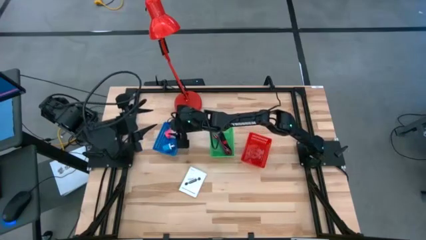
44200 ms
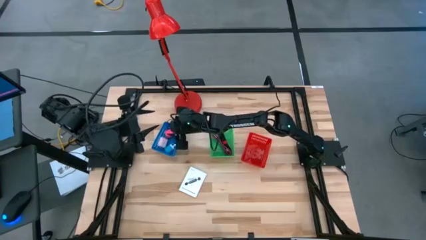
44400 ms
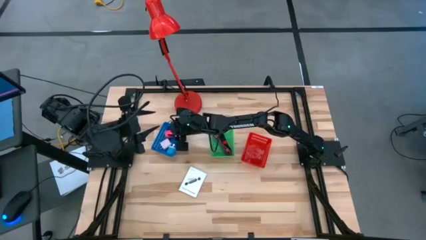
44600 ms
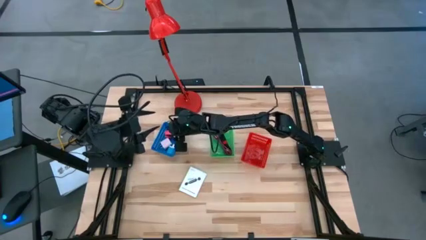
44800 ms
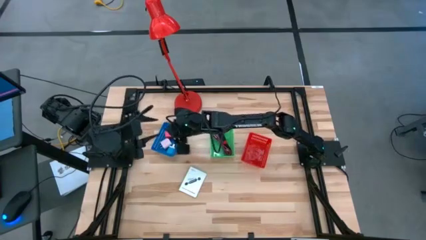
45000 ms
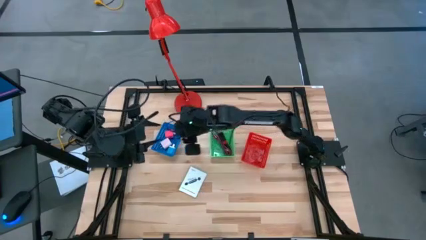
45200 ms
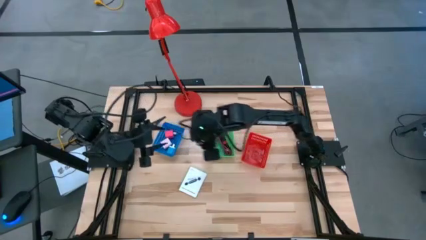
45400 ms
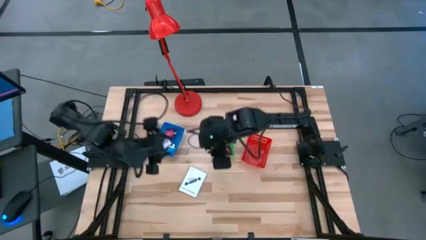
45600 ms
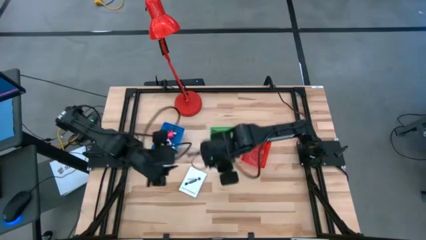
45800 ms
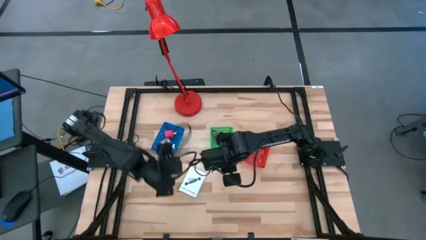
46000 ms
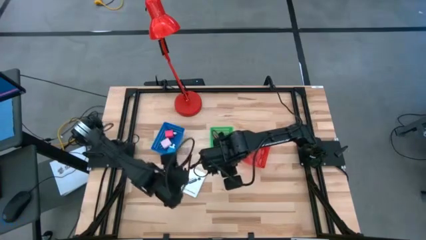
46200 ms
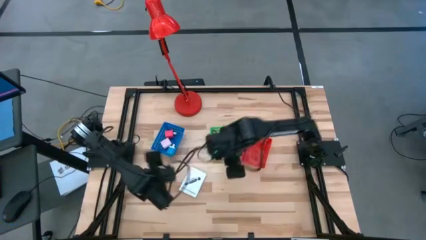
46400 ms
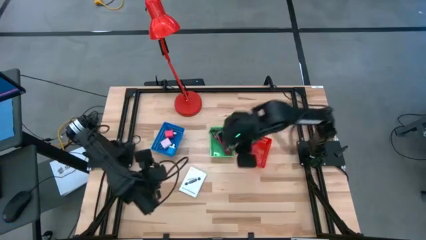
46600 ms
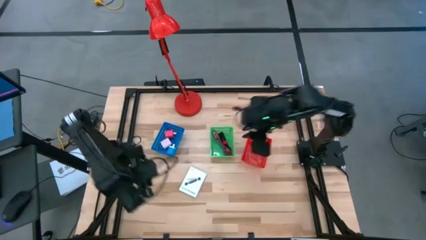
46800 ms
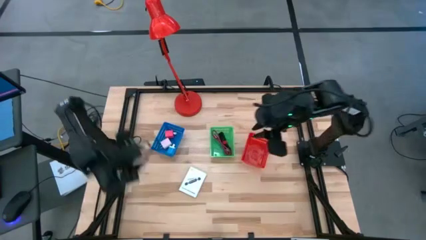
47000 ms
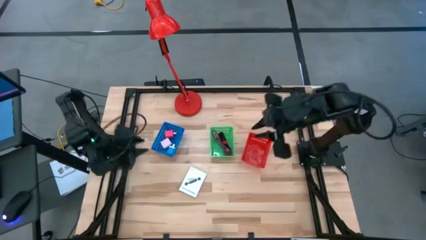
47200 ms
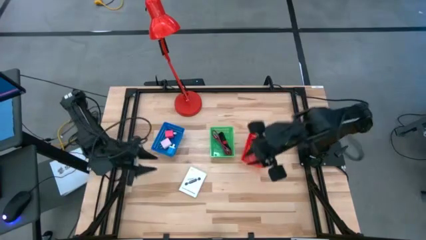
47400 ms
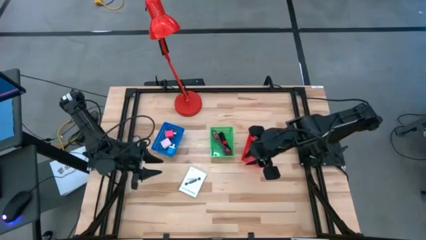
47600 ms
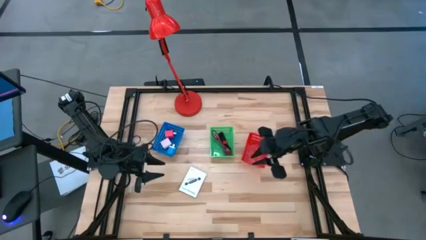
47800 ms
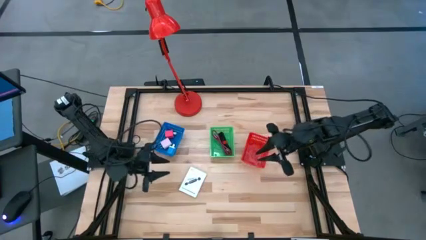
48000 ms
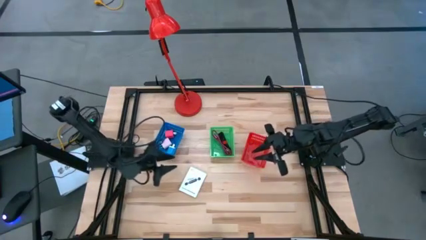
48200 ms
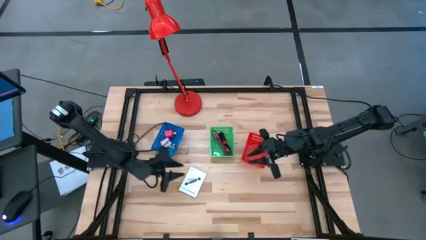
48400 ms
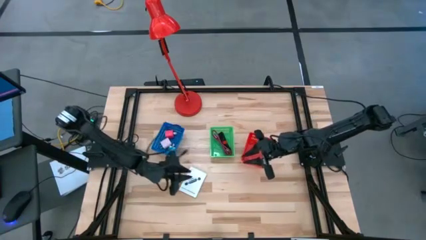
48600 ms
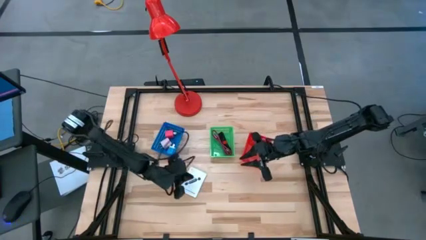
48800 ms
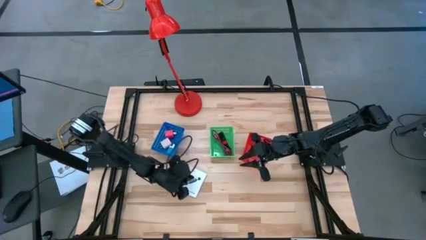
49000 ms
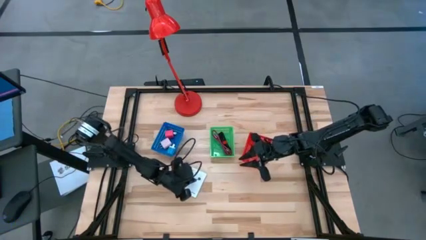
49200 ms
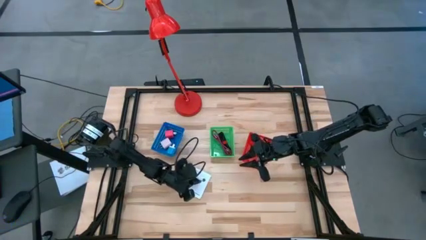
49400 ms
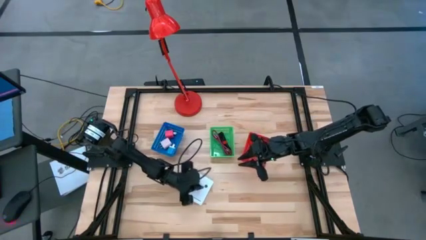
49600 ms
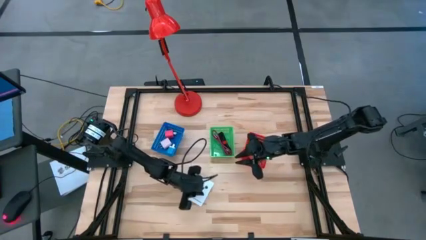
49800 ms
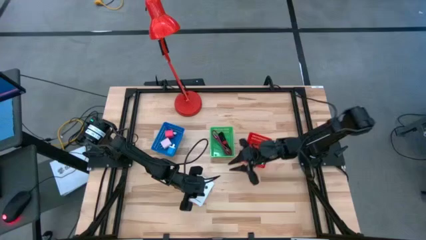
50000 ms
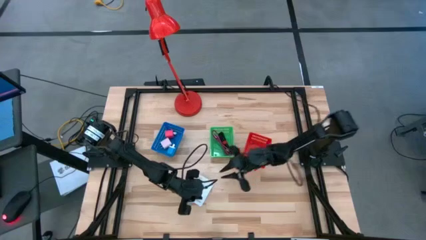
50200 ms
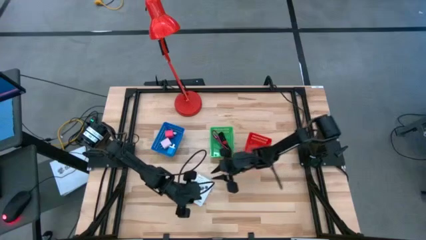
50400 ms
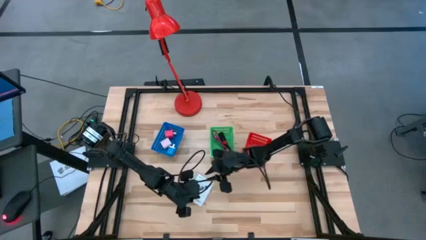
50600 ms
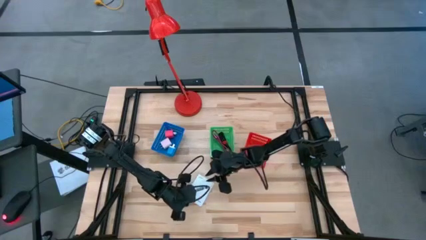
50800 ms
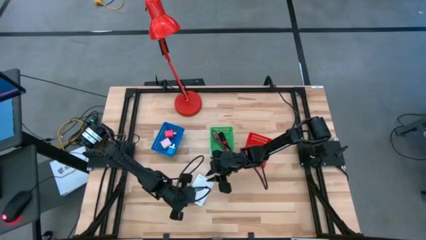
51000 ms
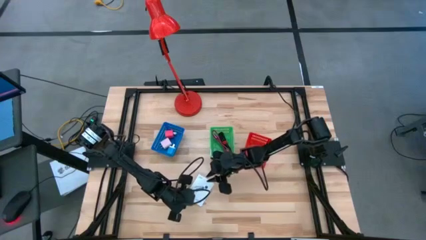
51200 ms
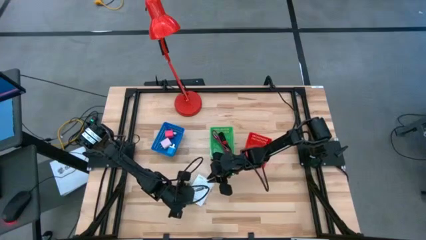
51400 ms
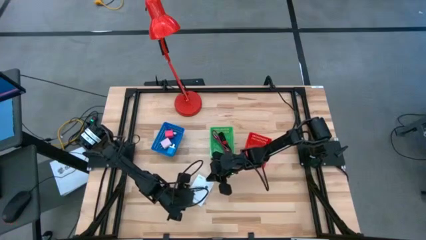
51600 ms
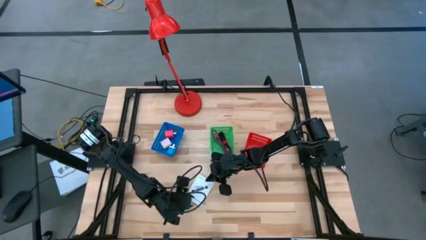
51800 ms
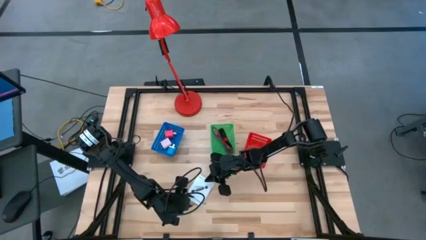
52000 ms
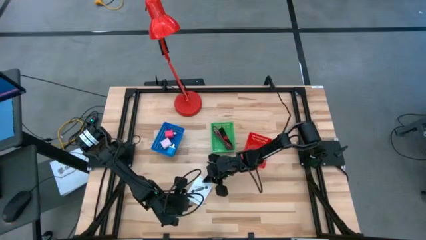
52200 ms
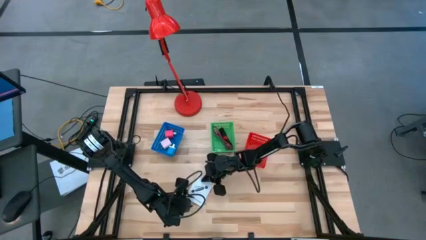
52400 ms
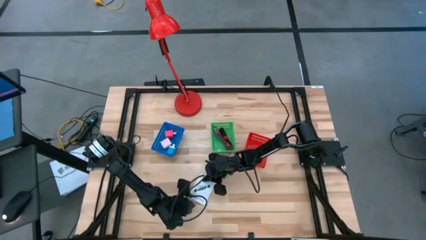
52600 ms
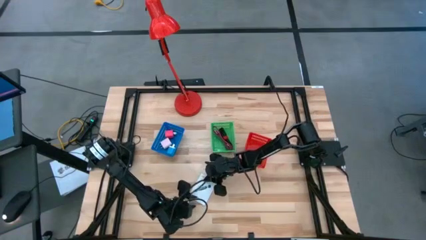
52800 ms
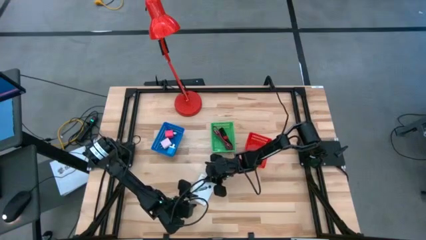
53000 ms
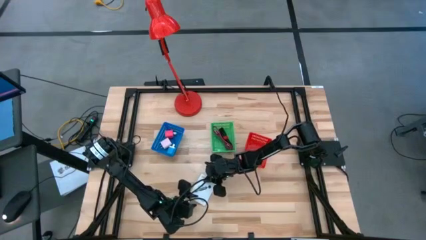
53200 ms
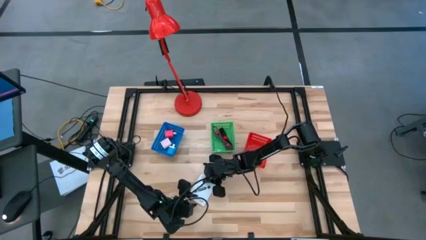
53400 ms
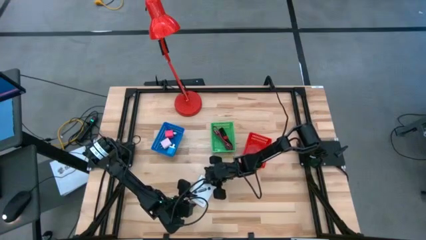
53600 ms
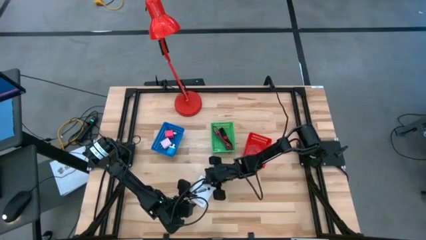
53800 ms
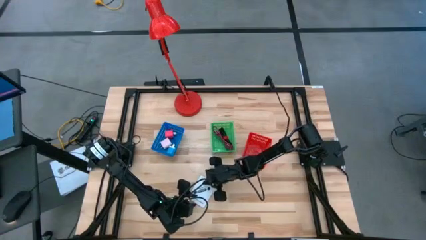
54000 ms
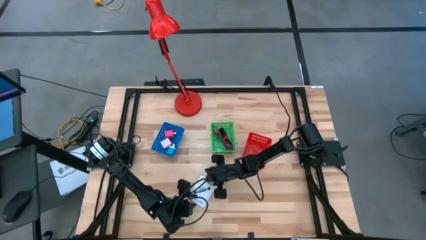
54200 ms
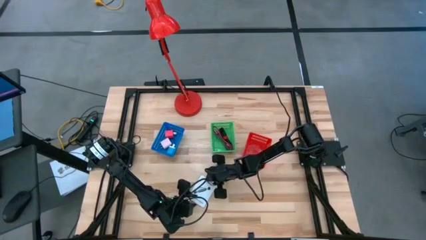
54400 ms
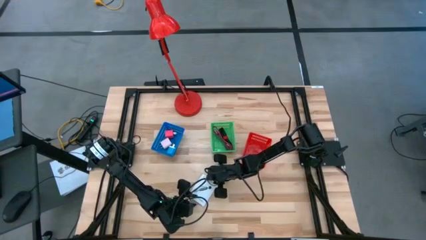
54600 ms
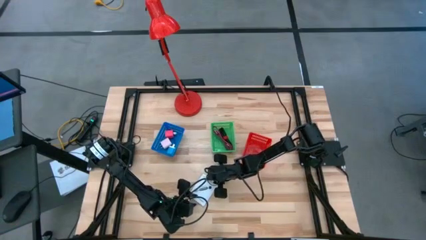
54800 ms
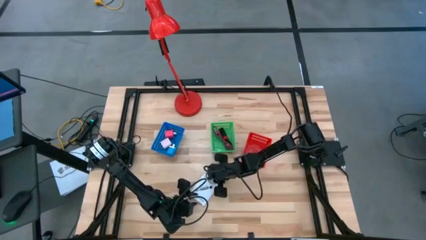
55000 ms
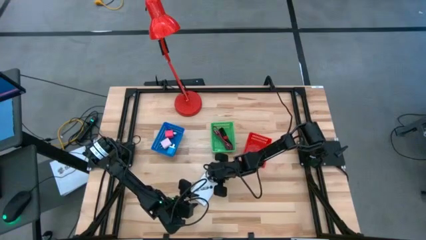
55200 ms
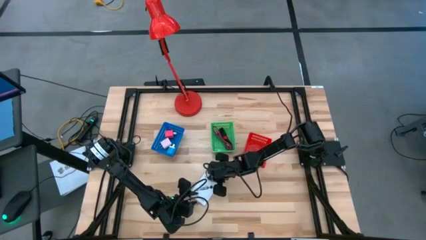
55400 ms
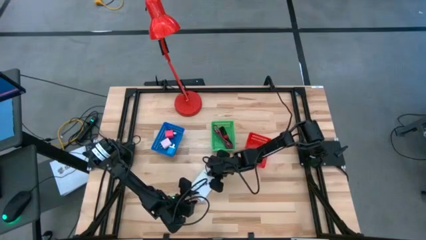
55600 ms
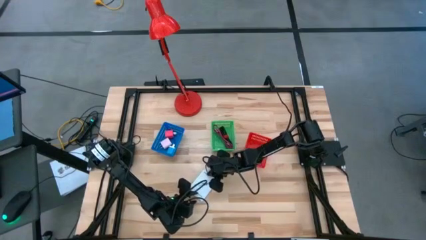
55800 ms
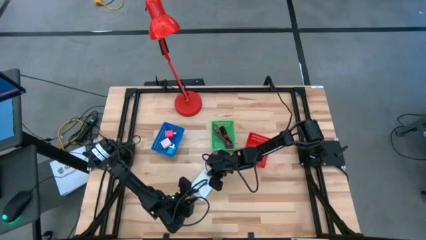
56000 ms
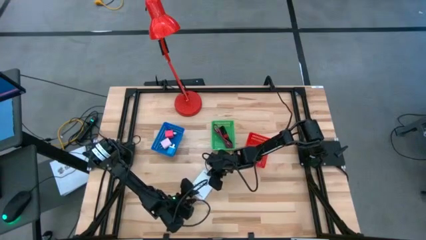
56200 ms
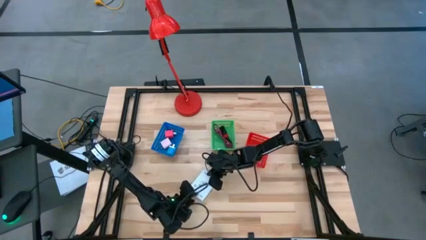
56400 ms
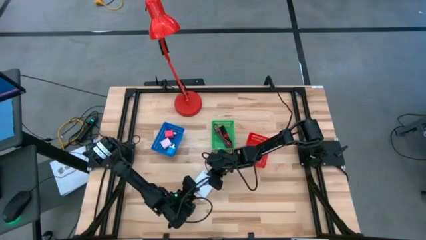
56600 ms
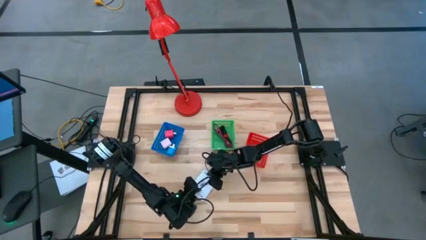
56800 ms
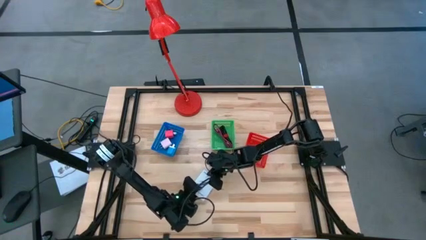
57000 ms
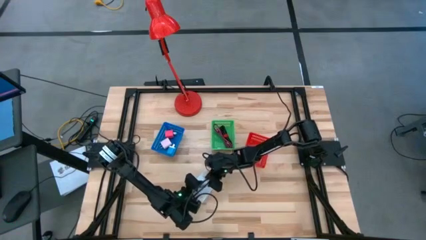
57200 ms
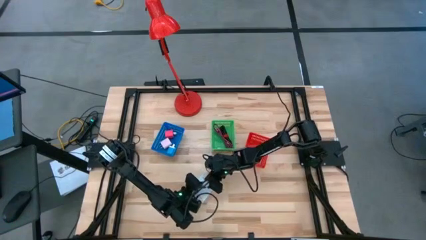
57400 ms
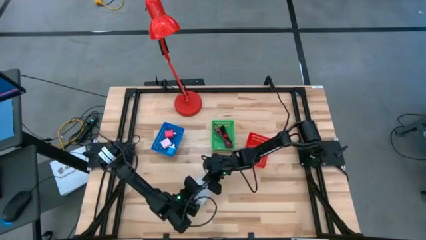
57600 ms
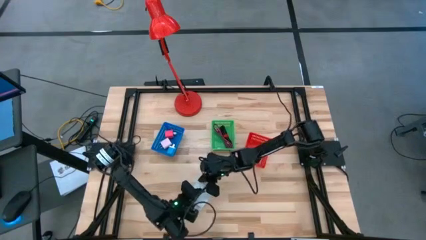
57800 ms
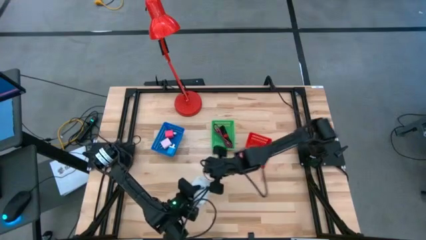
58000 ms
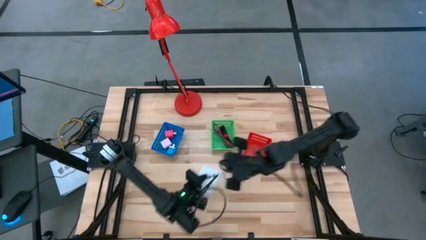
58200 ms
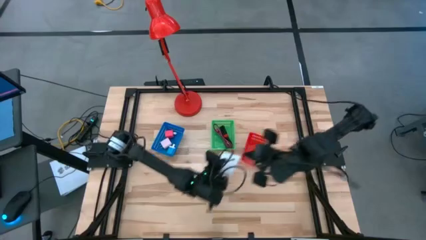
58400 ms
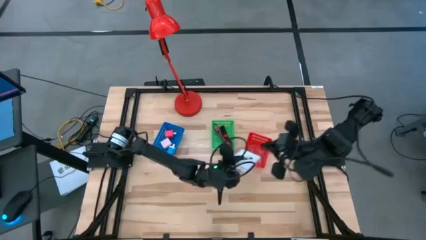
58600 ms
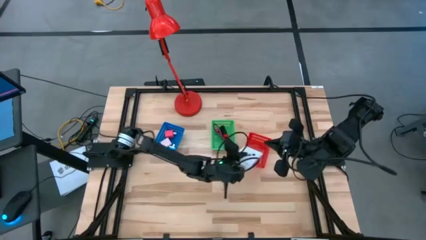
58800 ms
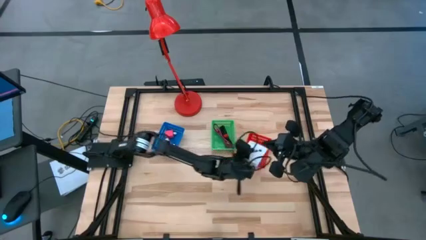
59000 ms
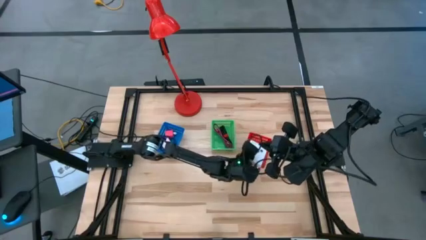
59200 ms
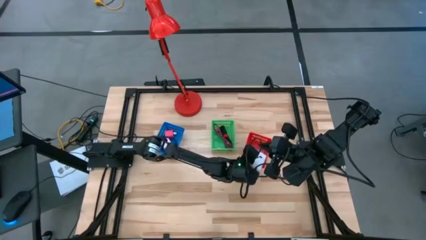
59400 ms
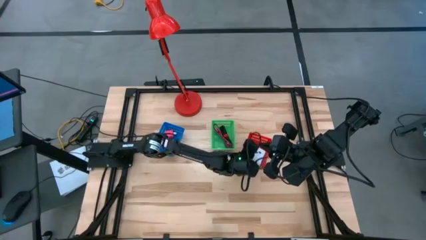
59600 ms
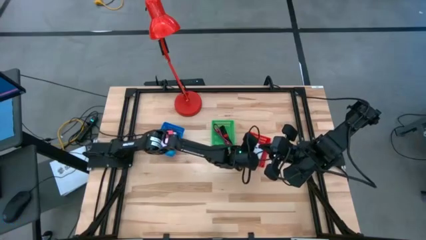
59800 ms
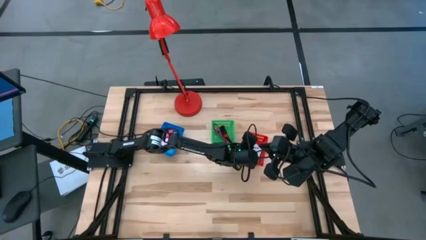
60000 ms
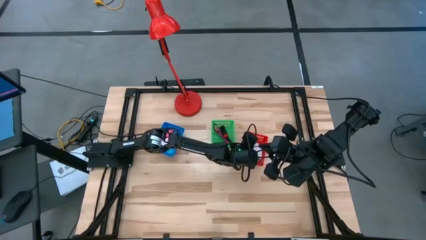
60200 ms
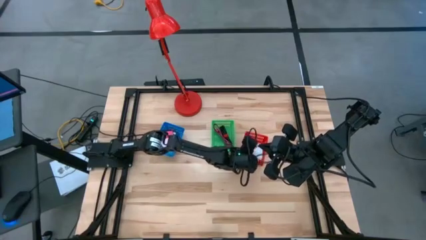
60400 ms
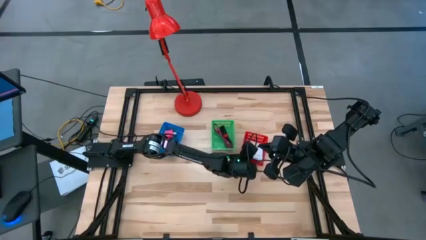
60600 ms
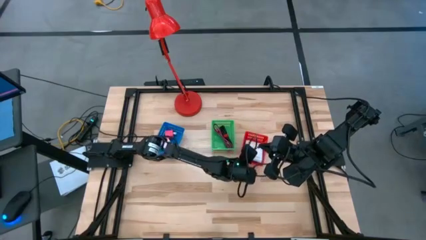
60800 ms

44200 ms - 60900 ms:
Task: Pick and place items into bin
Put the white card reader box into the red bin
